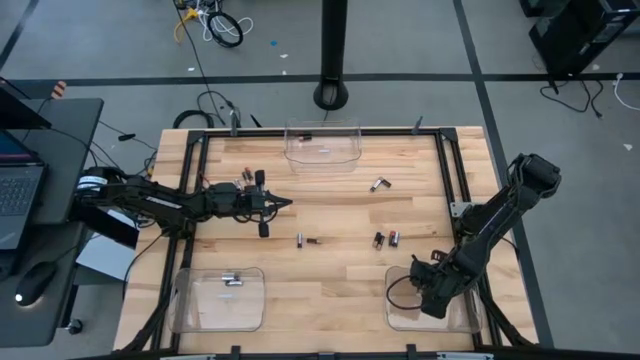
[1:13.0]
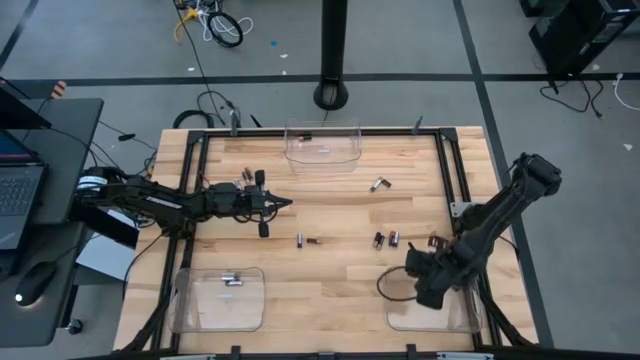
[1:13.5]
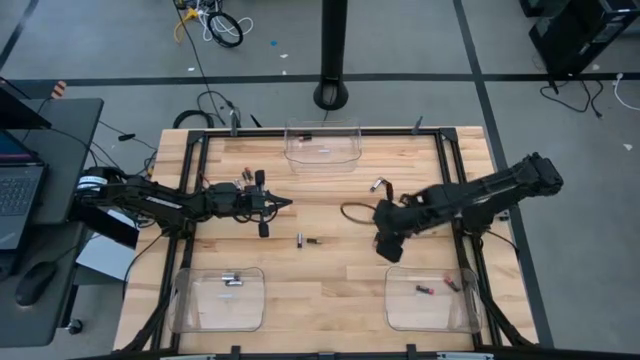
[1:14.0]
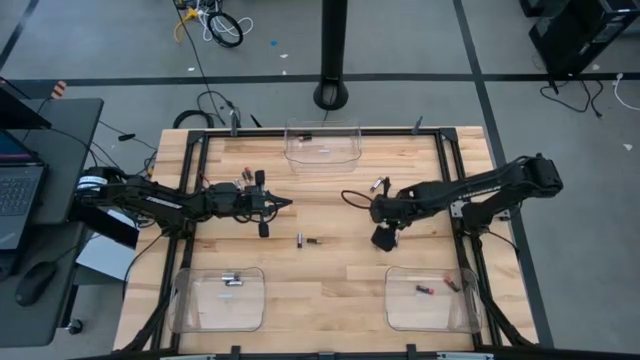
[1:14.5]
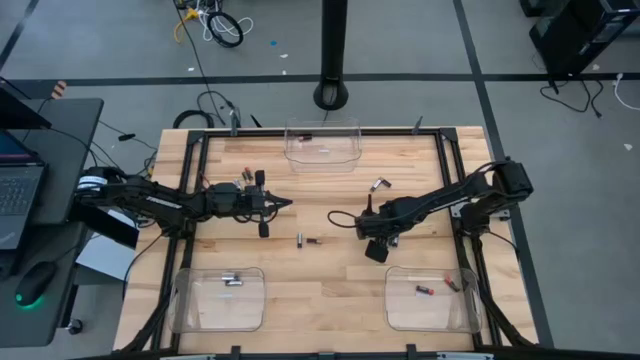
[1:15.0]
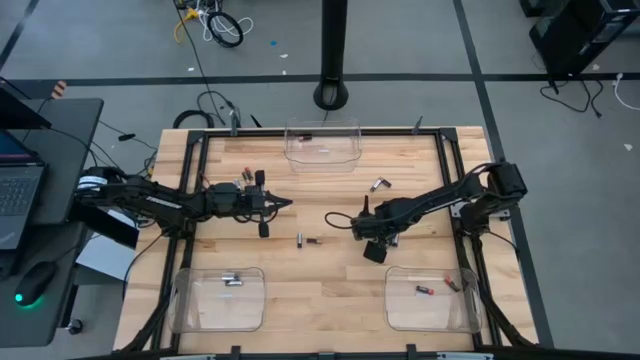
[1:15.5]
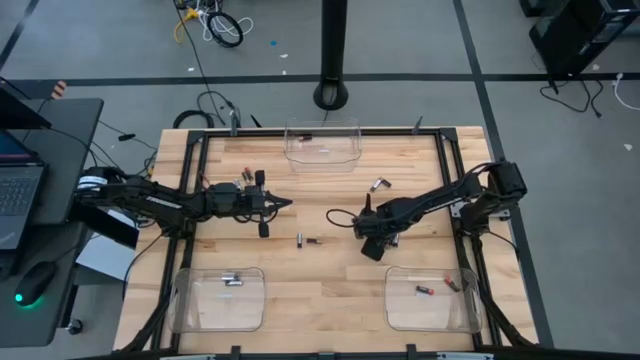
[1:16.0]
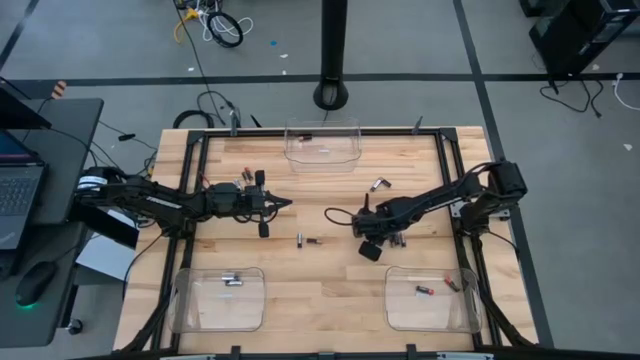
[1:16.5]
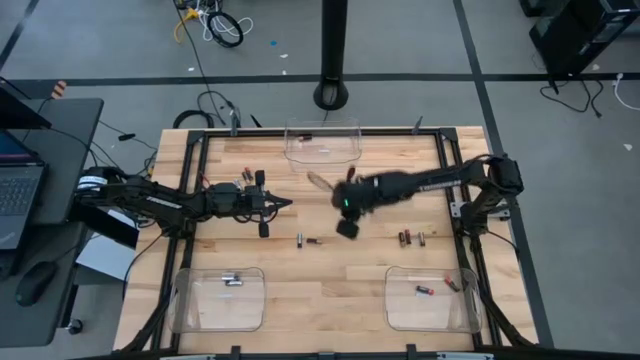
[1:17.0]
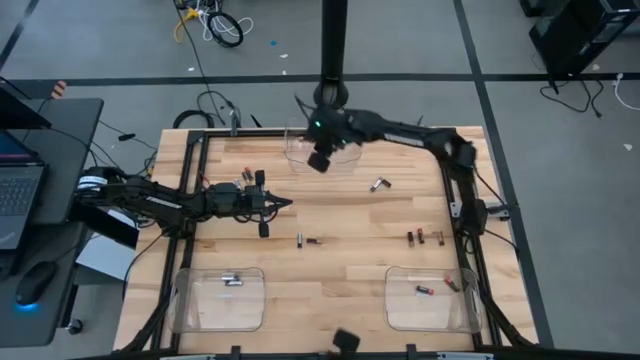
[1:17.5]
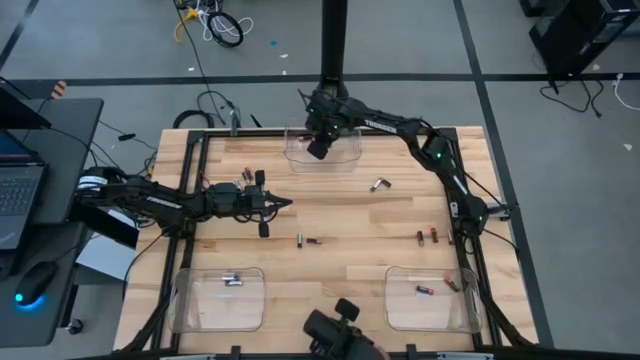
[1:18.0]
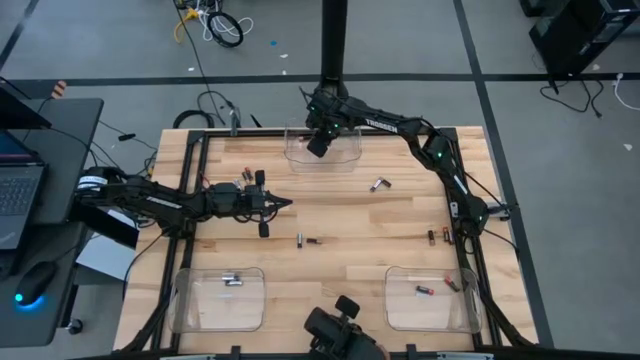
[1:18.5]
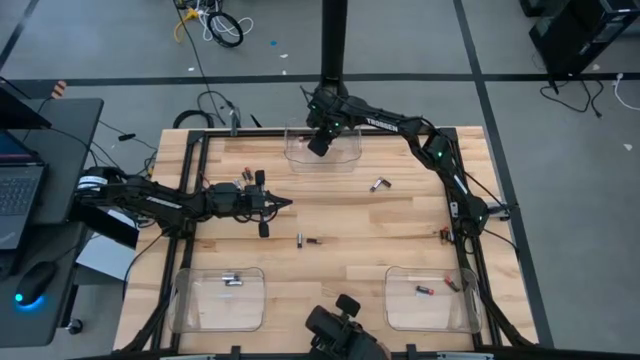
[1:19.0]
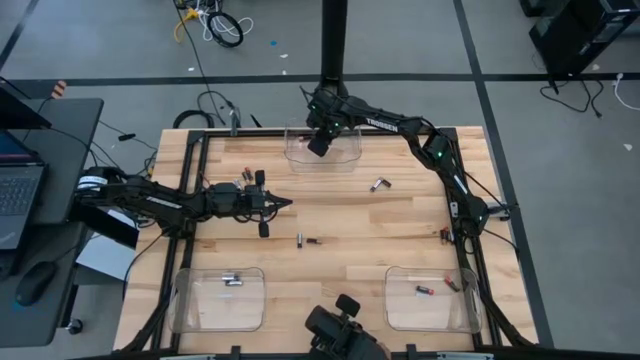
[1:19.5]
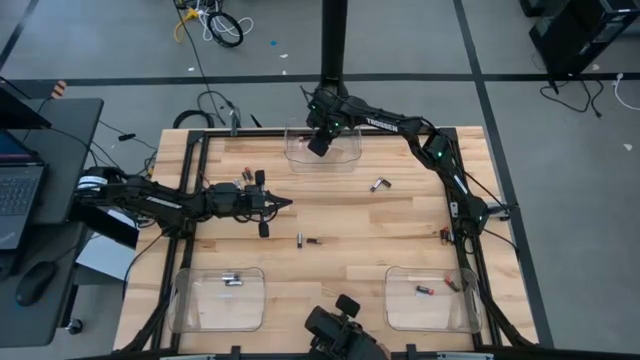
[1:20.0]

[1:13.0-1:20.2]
Task: Sort batteries
Put the brown battery into the top middle transparent bin

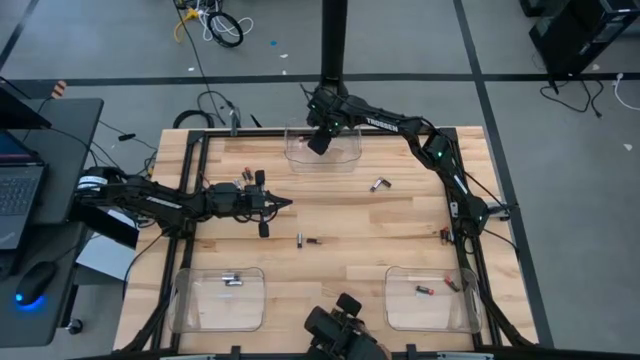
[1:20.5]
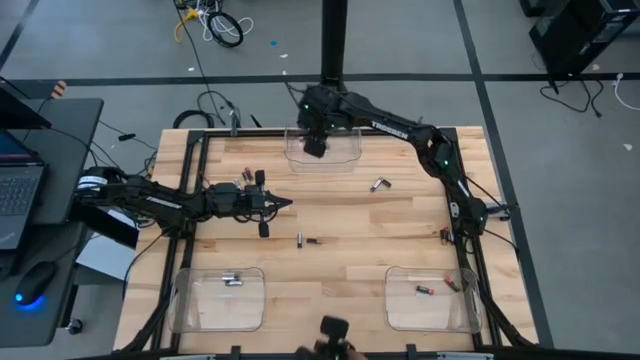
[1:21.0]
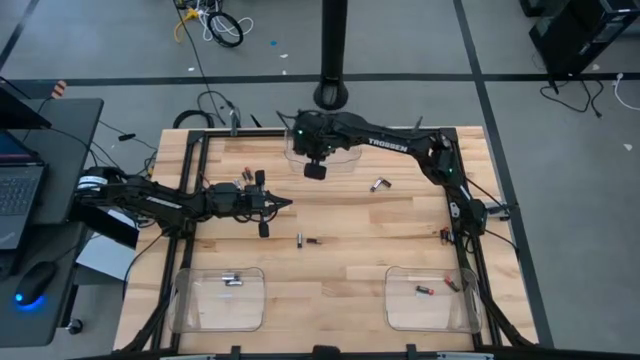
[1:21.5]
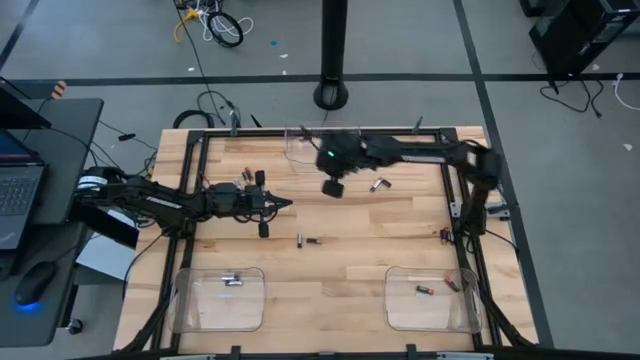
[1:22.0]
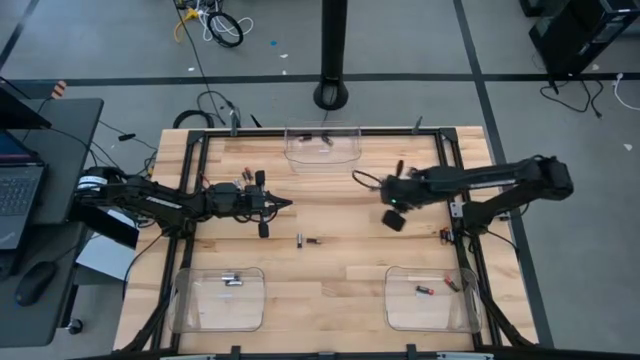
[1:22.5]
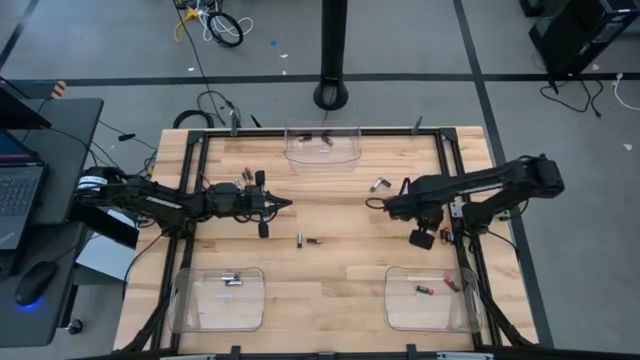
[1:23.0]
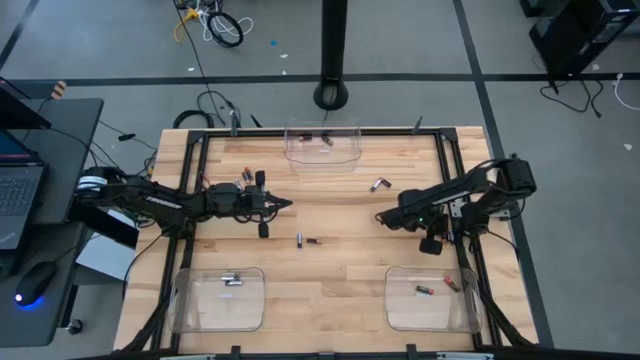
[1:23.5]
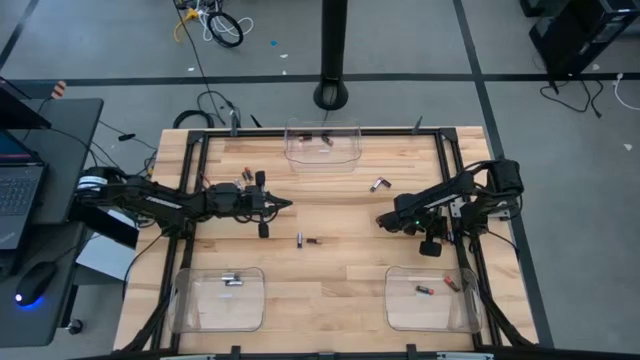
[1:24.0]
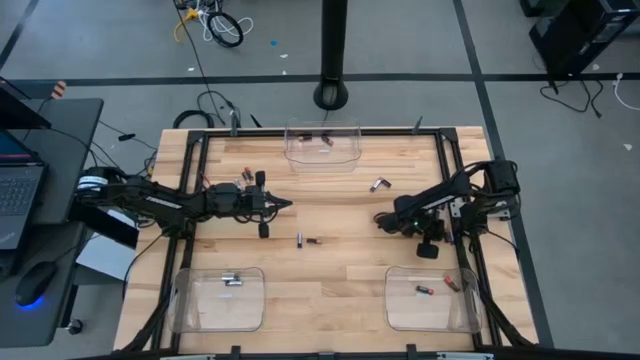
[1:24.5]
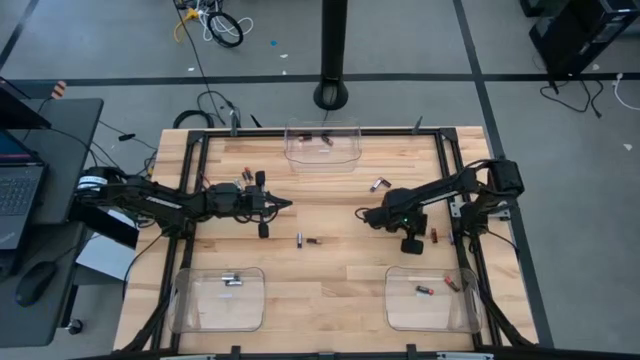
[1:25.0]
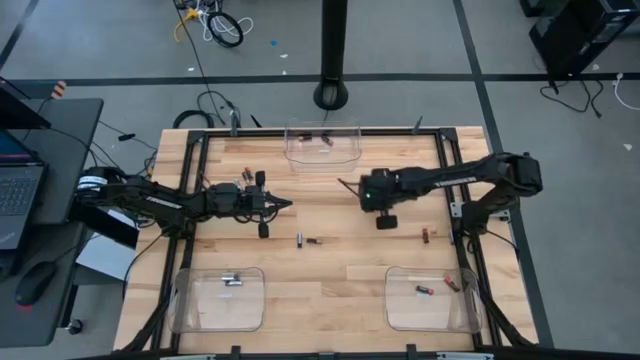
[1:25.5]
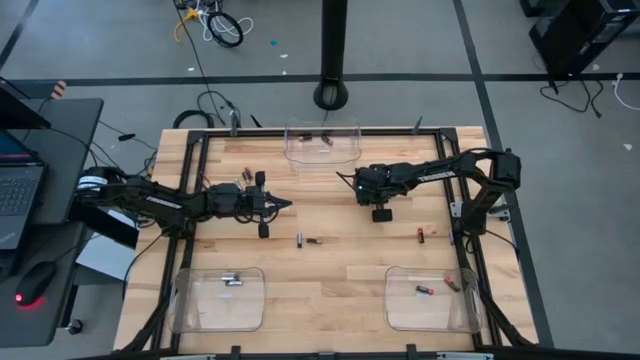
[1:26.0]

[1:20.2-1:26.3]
Put the brown battery into the top middle transparent bin

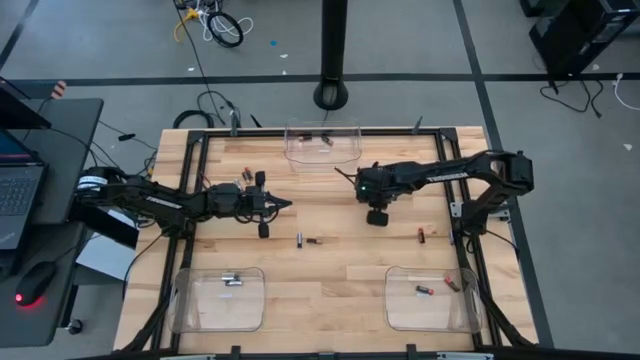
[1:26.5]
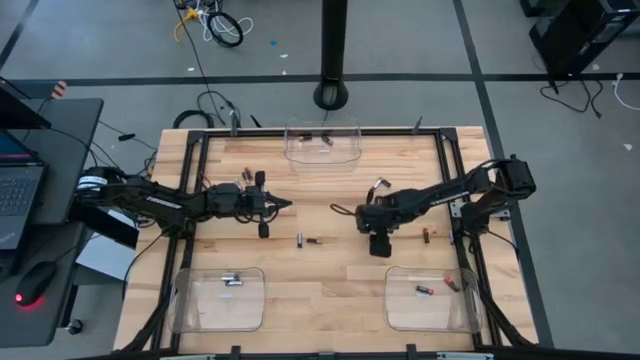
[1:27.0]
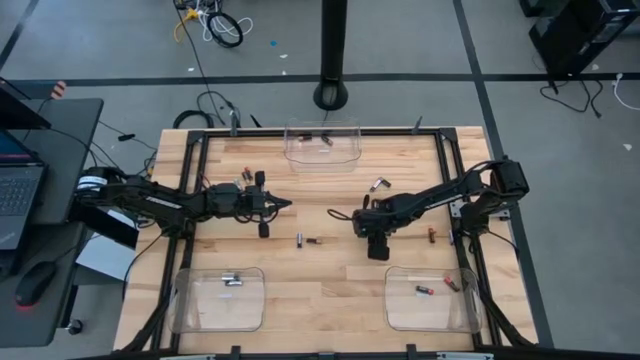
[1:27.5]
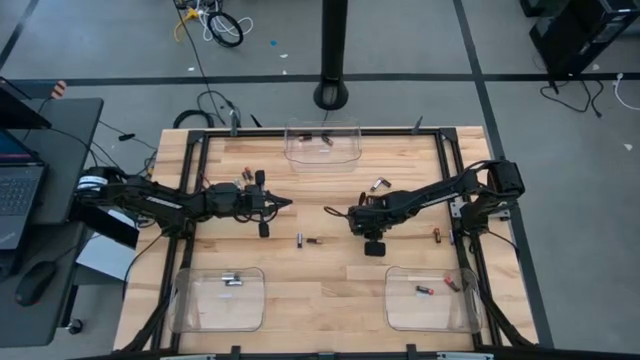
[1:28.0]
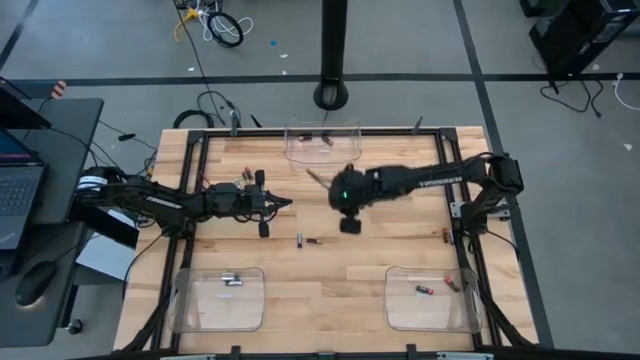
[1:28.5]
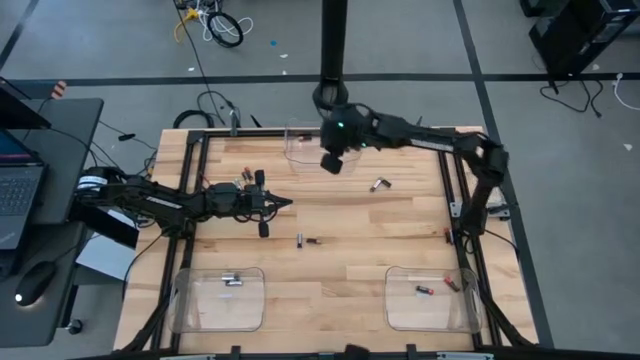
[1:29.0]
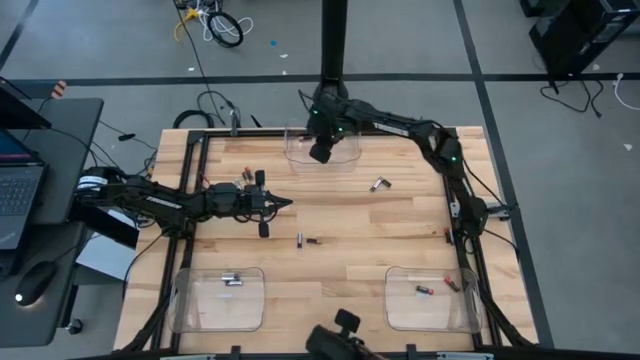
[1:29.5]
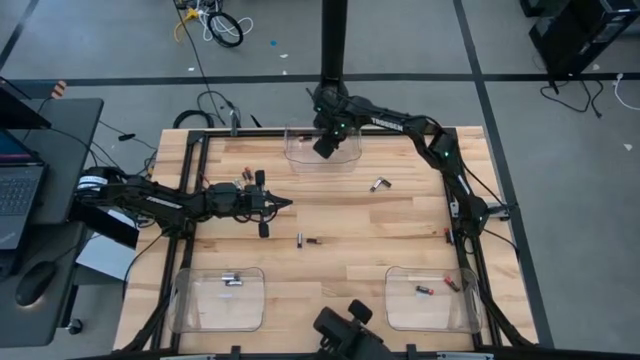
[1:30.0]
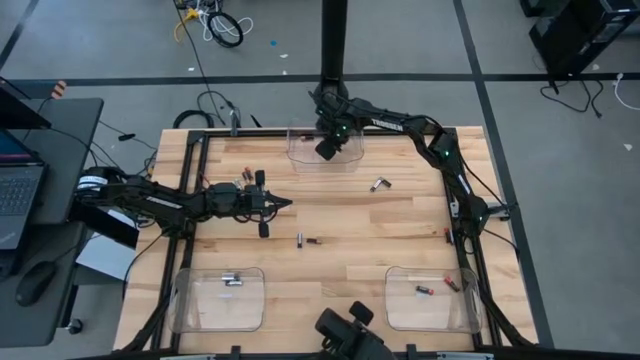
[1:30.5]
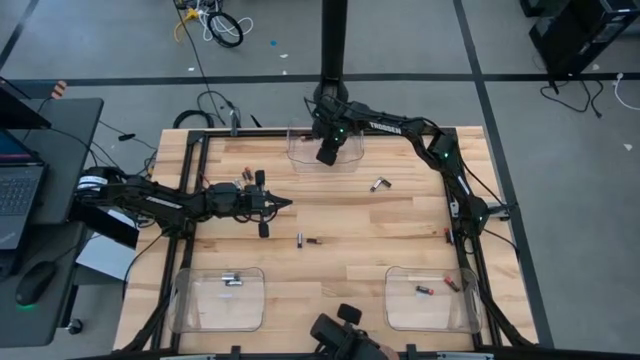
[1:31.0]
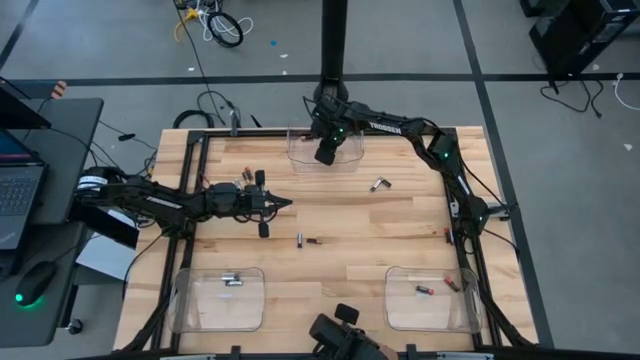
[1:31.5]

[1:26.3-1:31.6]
Put the brown battery into the top middle transparent bin
